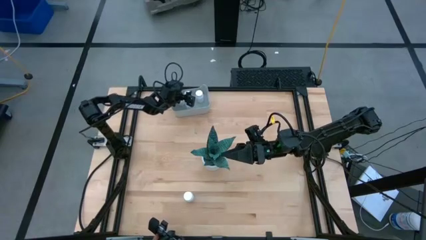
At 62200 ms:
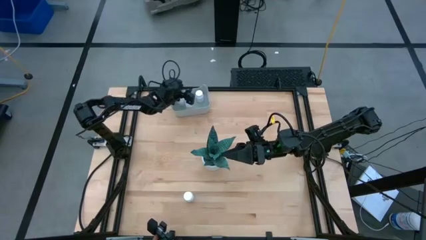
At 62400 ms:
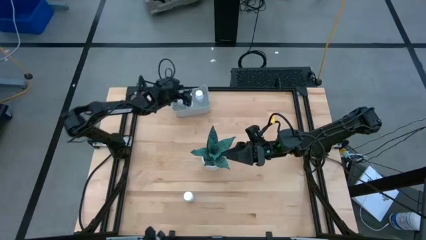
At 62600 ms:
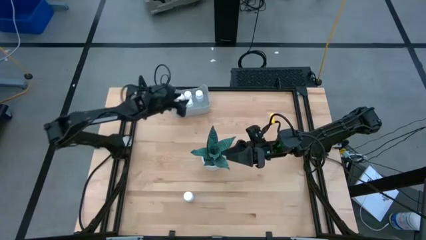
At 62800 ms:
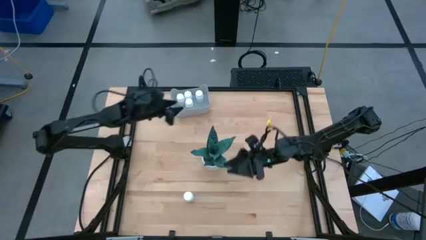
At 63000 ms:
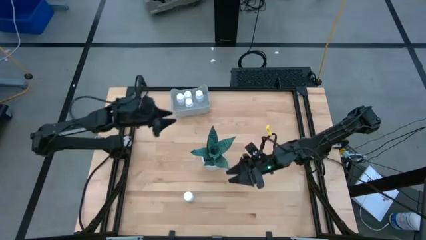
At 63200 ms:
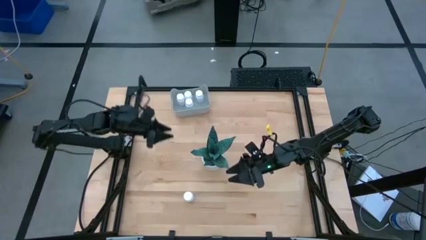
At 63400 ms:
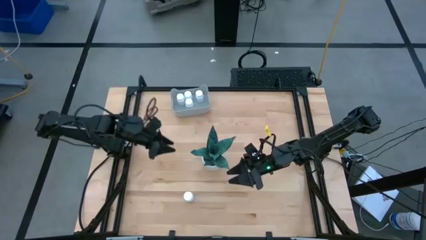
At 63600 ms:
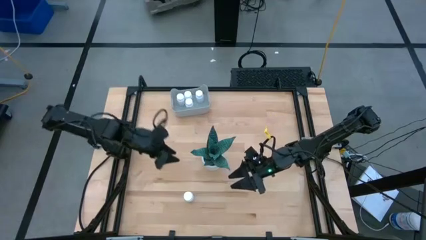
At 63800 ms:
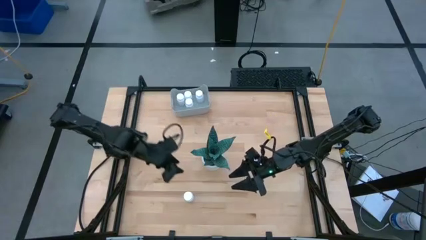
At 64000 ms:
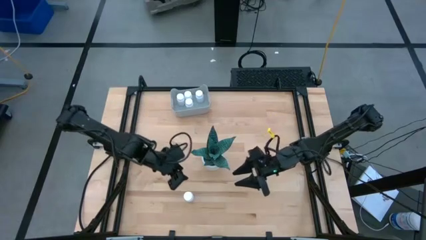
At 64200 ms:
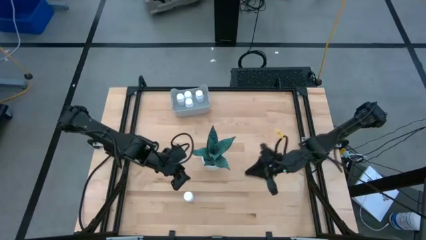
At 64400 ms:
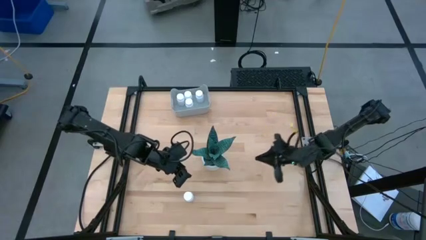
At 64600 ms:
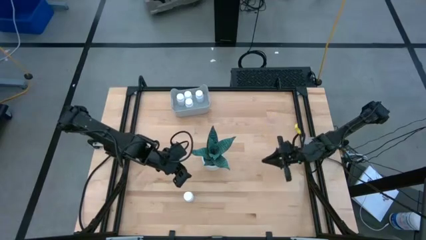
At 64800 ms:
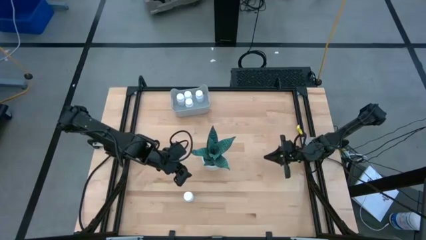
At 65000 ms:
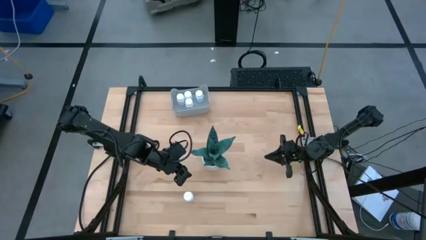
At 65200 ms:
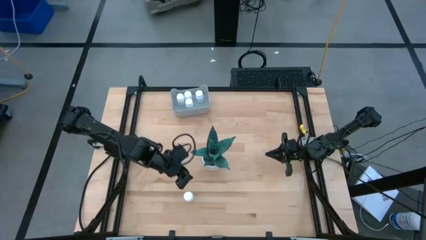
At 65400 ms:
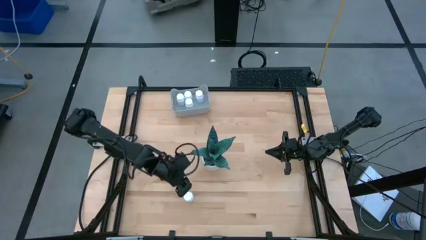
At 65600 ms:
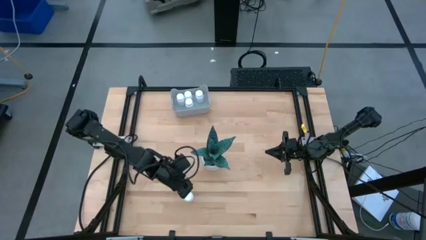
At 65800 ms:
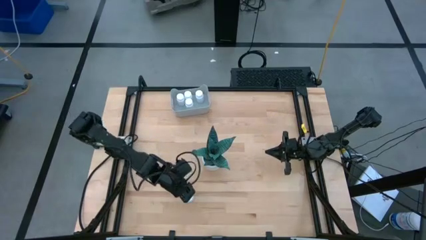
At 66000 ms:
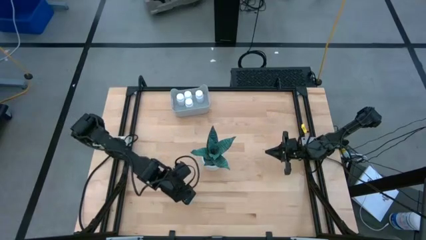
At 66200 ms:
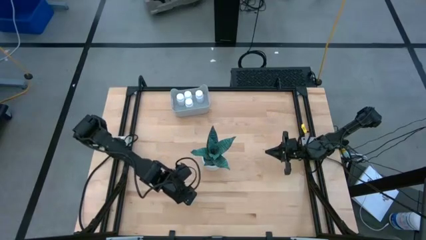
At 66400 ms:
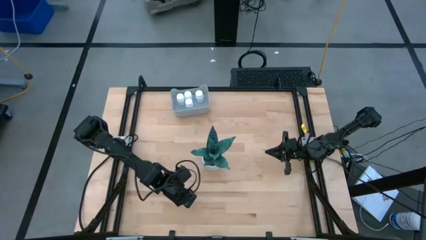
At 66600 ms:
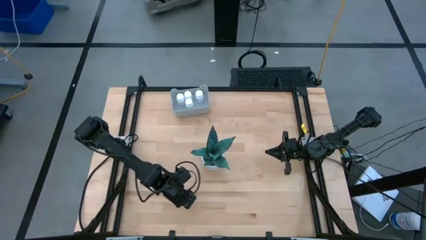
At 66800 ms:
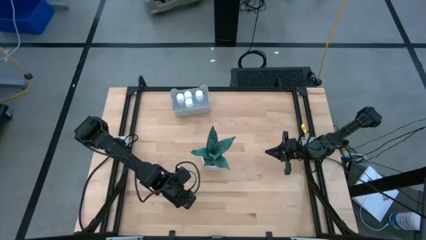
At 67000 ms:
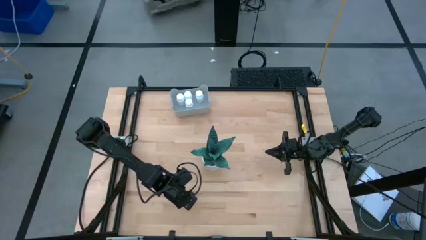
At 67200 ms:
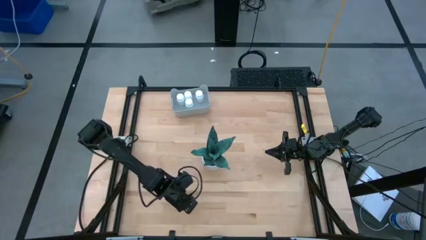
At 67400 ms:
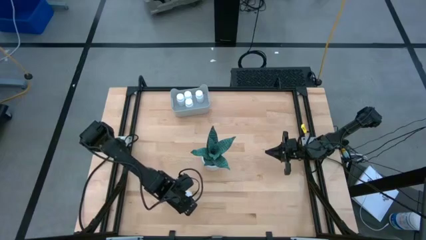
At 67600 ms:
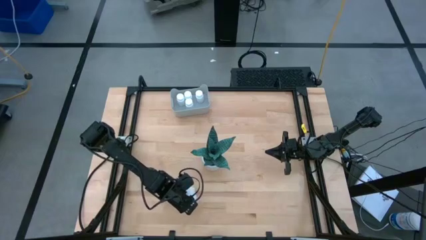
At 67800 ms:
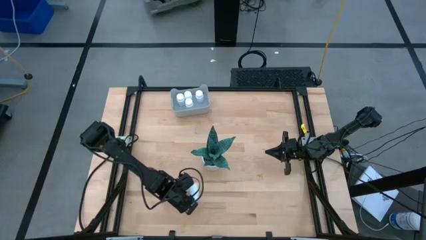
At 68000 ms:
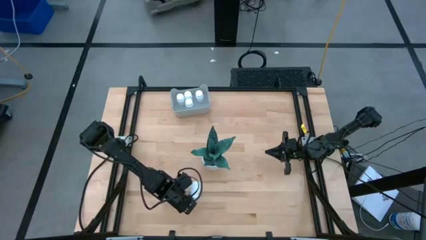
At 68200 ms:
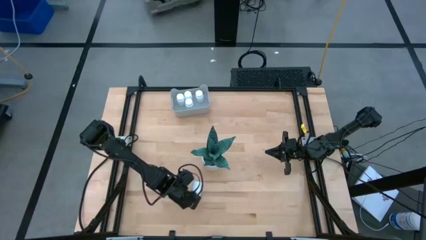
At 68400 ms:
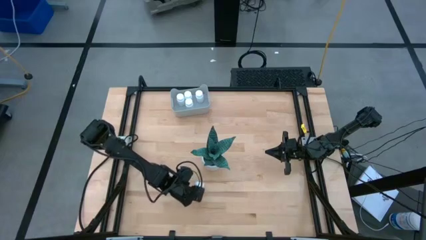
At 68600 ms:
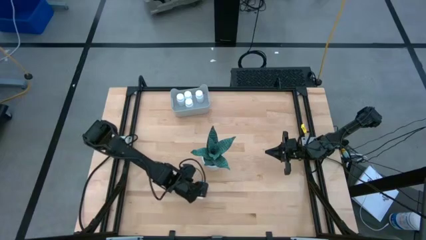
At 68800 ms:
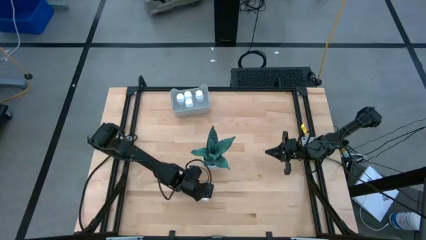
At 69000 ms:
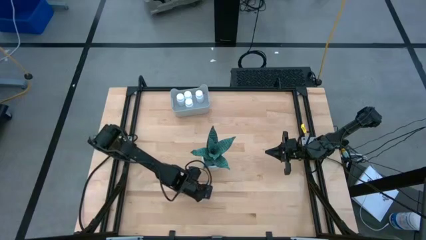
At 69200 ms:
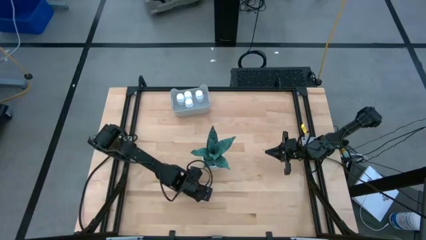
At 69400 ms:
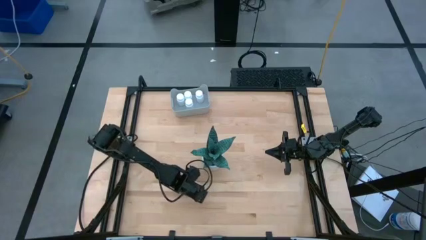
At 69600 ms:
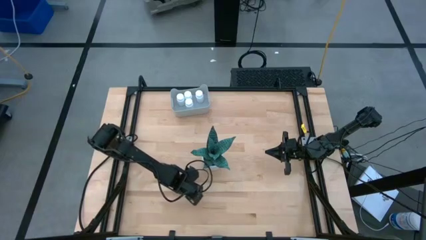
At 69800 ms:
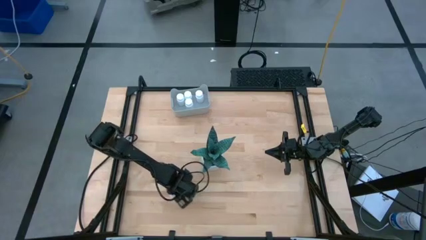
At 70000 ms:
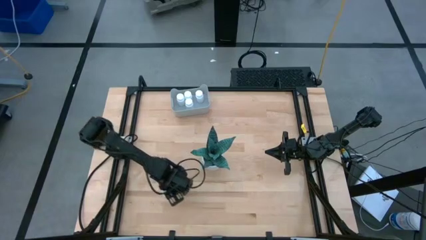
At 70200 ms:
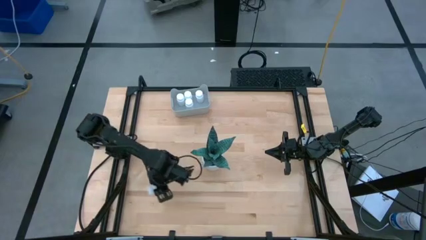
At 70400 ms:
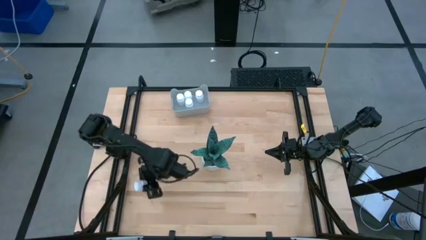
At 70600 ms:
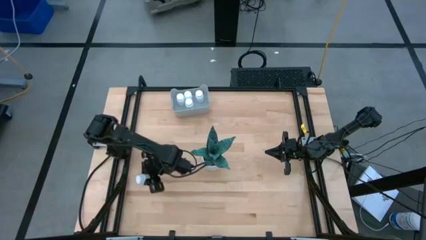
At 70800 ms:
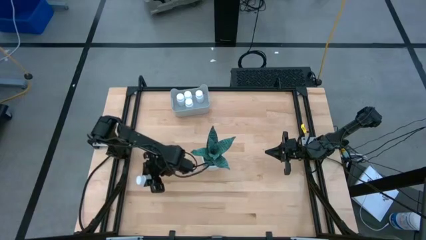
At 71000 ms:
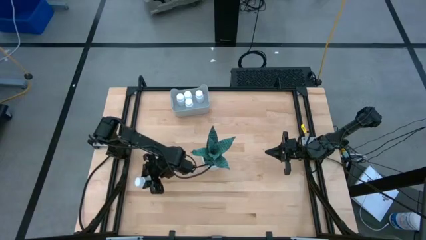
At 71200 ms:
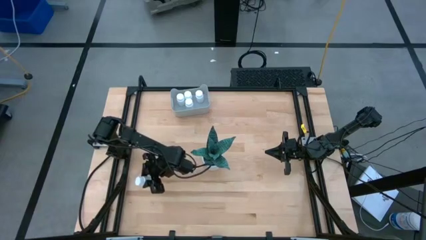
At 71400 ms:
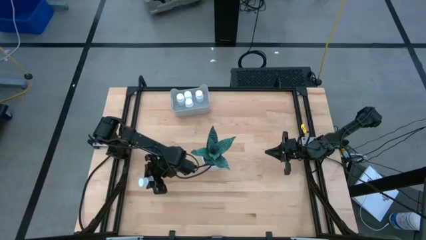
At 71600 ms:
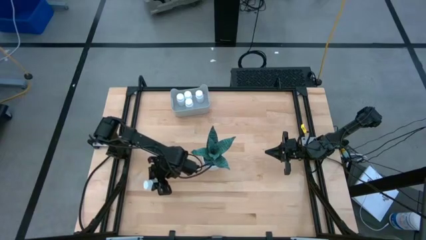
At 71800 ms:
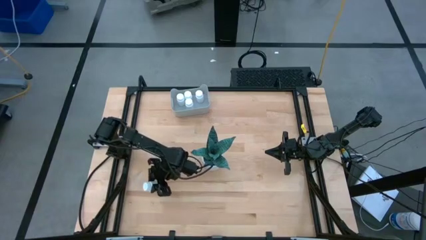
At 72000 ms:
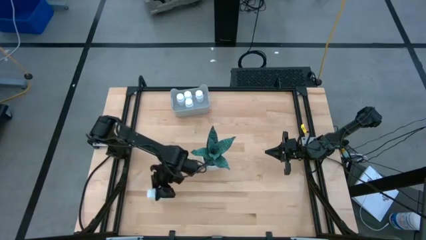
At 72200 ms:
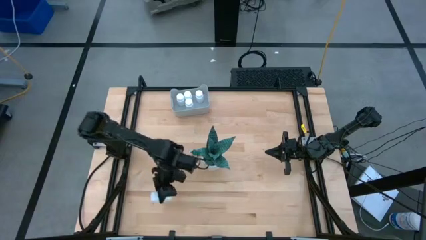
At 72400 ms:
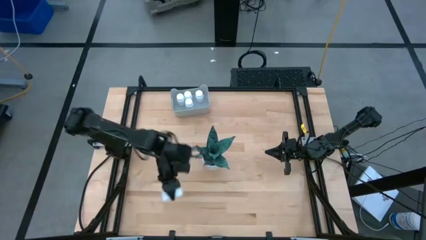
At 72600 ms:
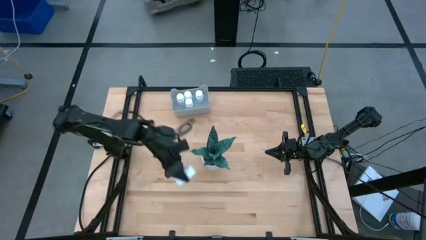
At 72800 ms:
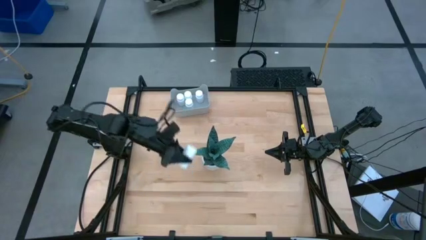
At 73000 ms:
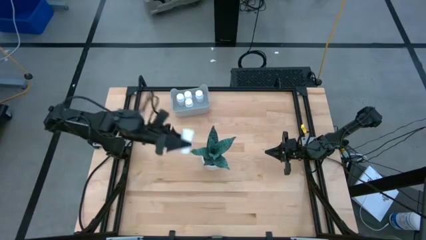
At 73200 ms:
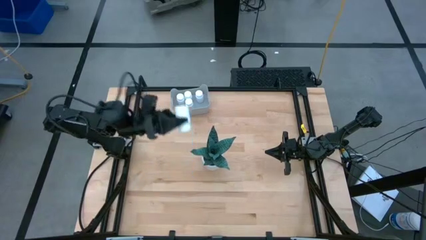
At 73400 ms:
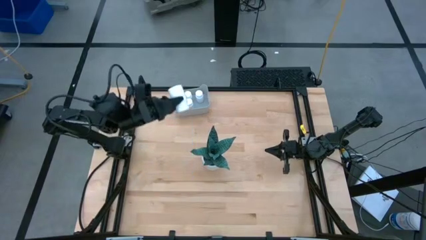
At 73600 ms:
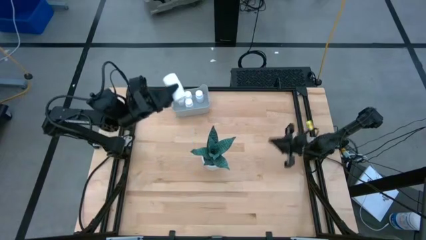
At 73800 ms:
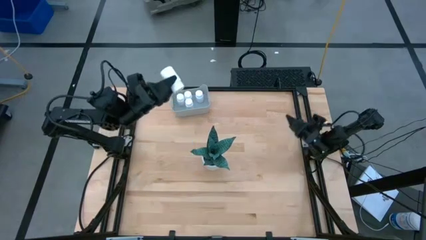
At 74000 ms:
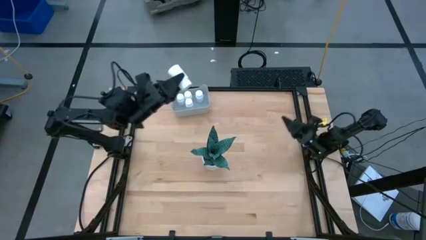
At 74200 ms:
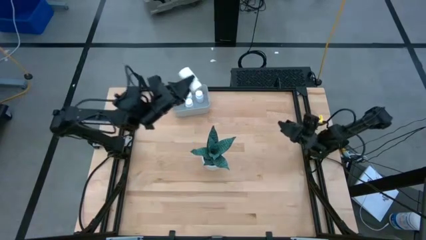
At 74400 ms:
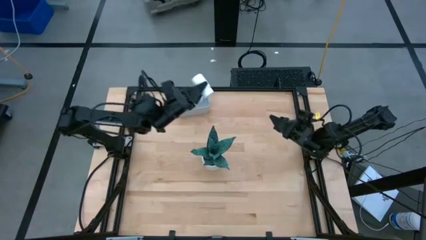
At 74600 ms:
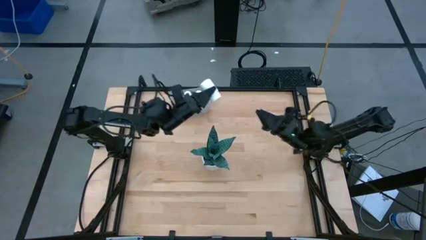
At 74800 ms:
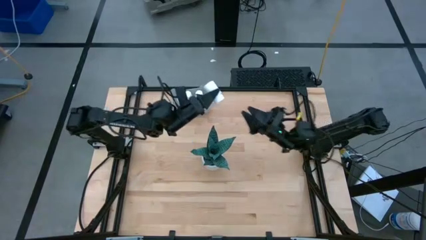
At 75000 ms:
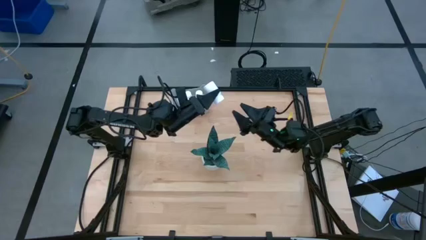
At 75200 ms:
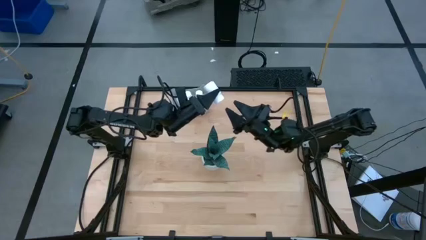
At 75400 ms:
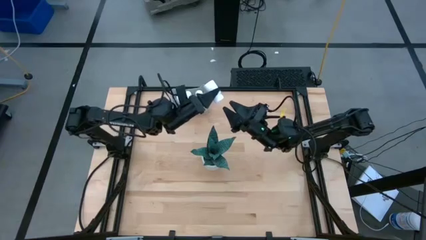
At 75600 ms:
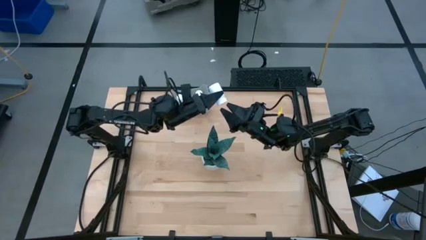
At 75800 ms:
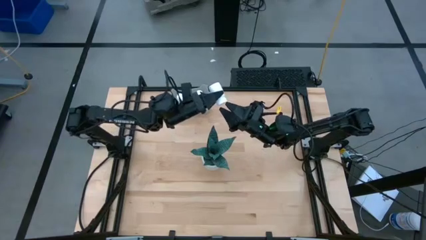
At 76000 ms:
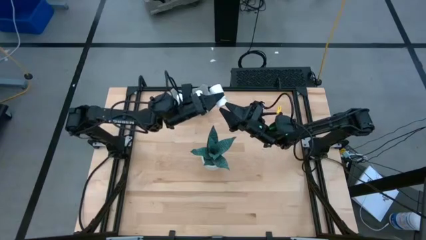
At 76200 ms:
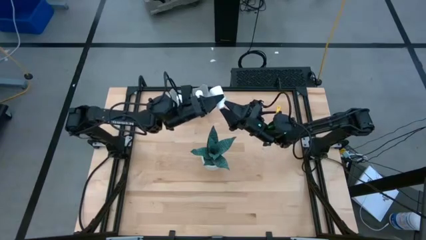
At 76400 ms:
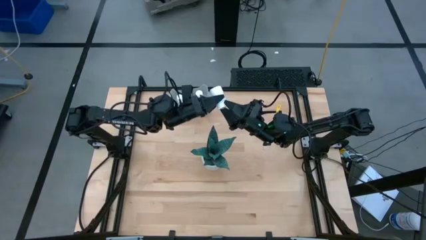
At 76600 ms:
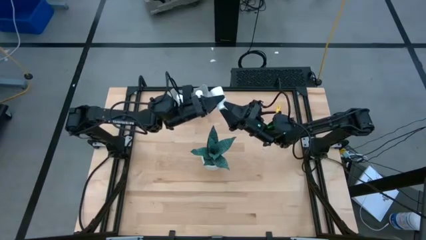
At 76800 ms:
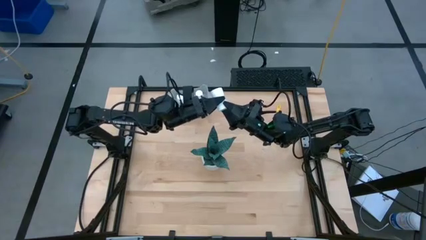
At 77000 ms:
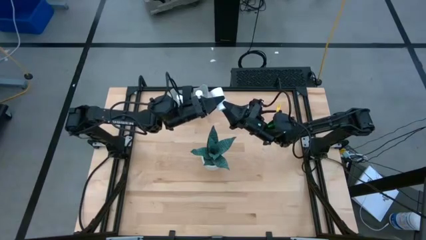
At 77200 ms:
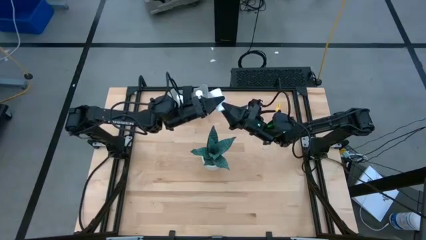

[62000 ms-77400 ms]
Task: Pick and place pill bottles into a basket
Put the white medicine bottle into the gray bin

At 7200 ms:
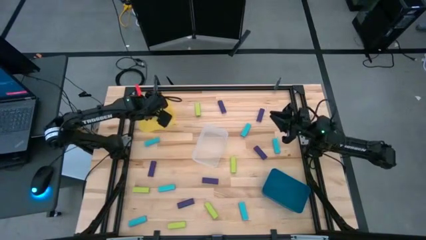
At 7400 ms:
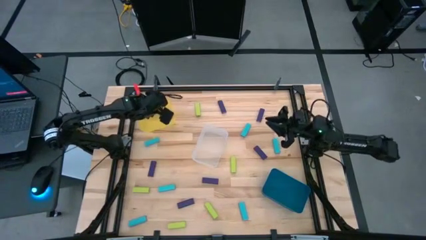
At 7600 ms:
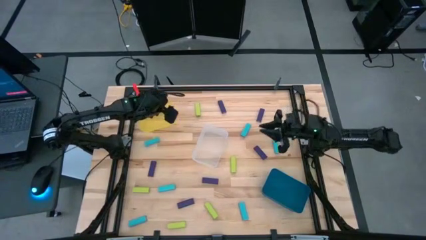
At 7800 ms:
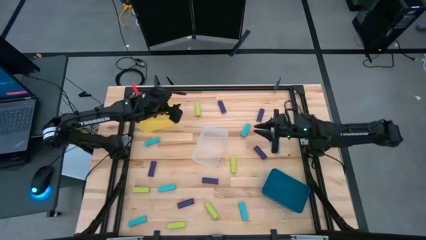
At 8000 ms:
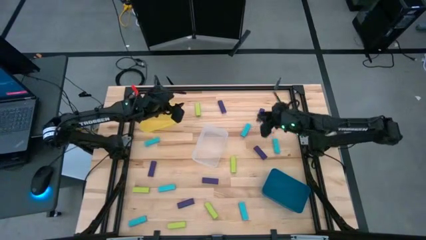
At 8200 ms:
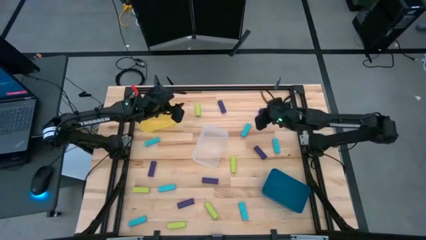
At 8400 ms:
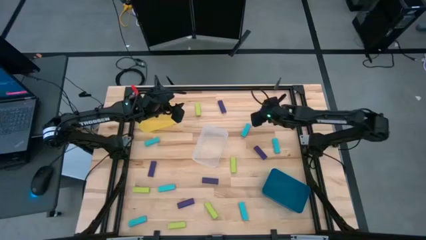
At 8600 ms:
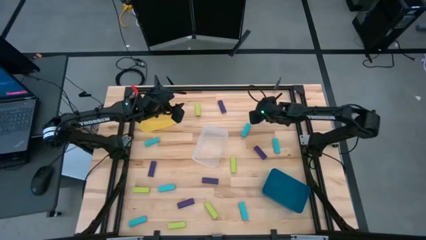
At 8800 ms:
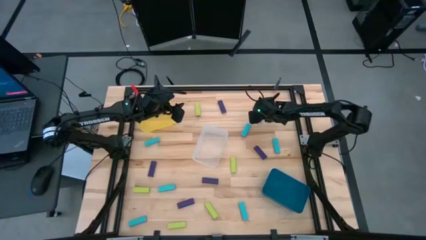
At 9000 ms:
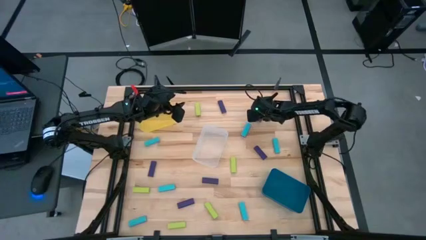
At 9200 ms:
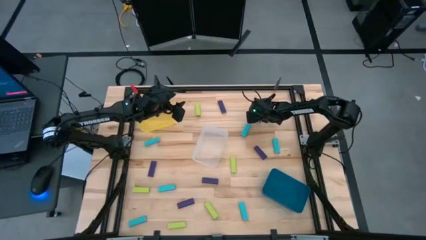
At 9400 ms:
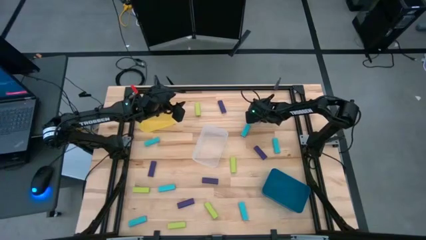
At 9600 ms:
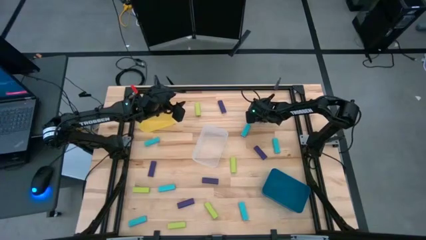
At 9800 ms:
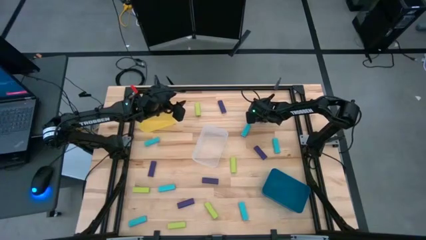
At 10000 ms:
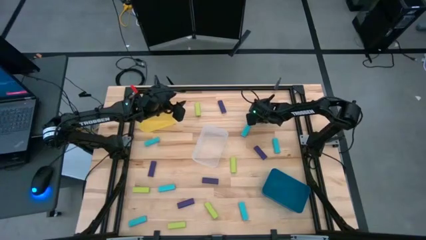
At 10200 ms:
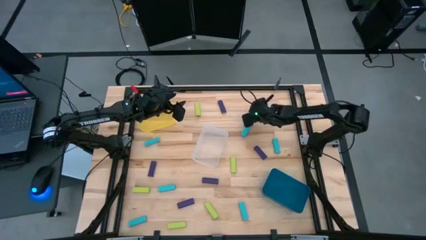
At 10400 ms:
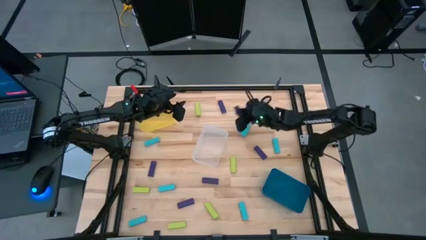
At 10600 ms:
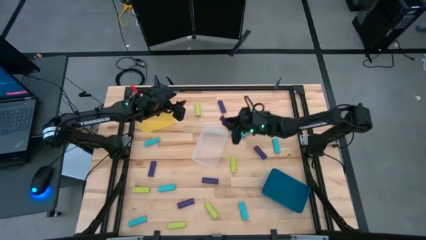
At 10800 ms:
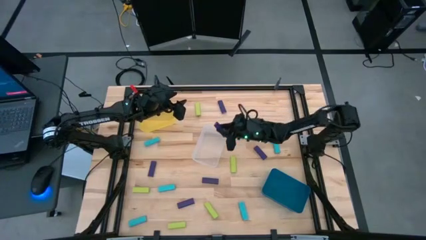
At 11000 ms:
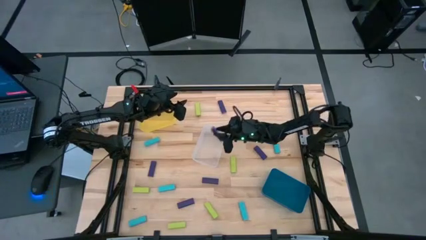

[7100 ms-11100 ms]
Task: Sort blocks
Put the violet block into the transparent bin
